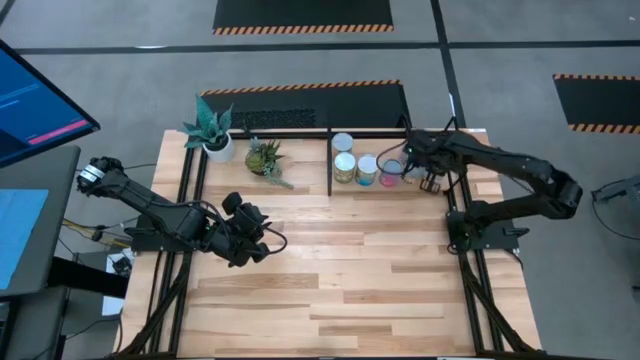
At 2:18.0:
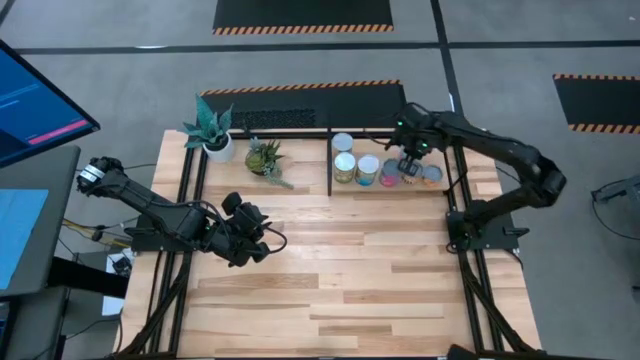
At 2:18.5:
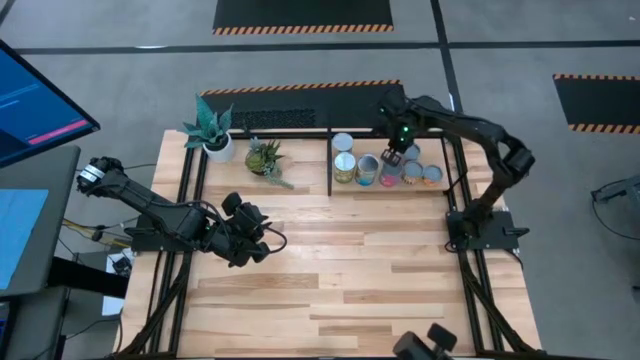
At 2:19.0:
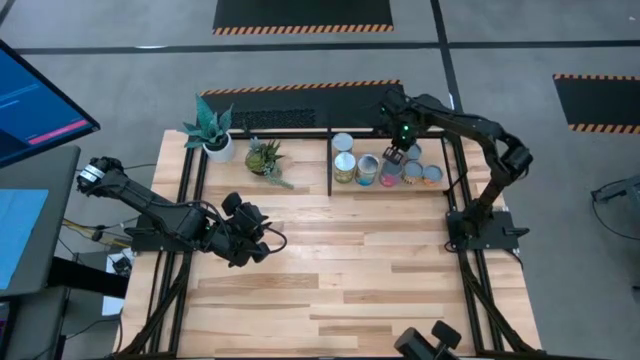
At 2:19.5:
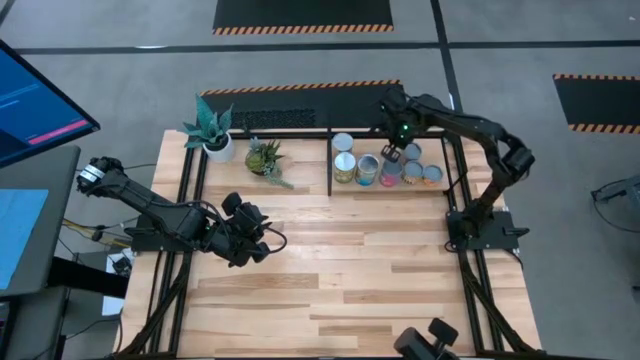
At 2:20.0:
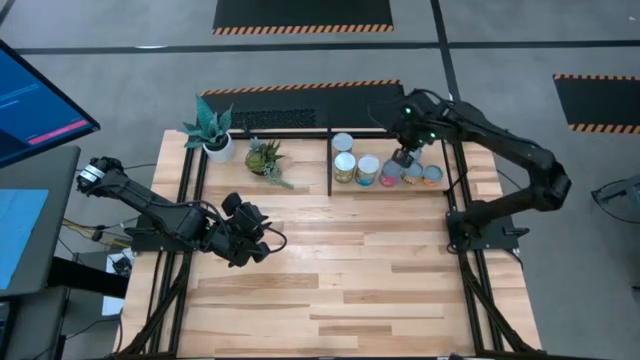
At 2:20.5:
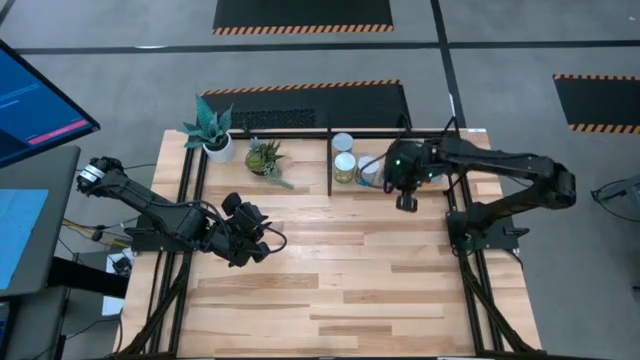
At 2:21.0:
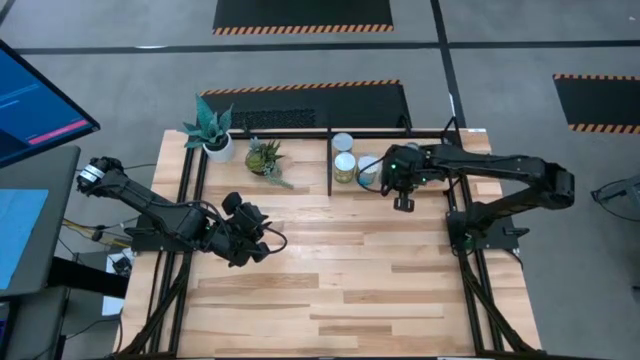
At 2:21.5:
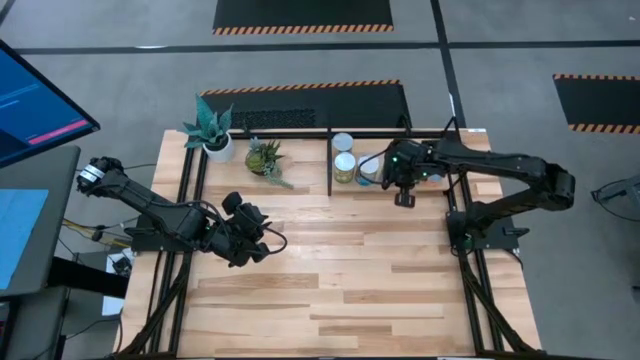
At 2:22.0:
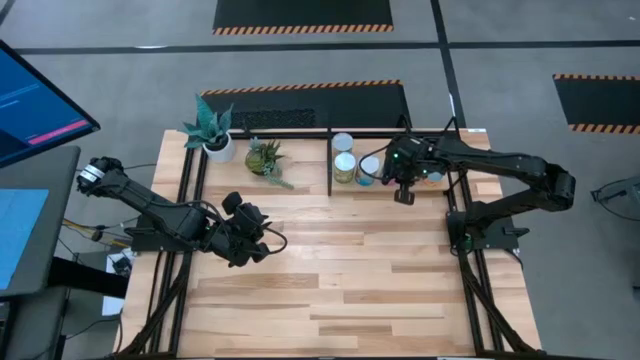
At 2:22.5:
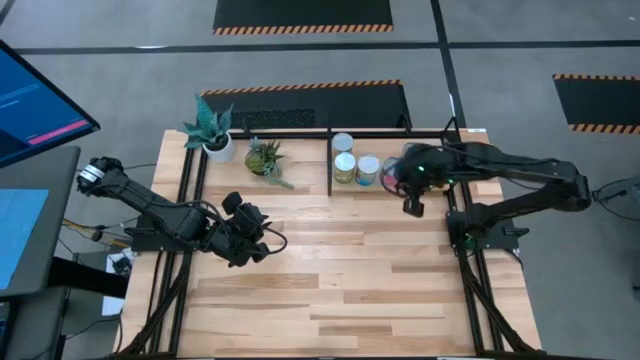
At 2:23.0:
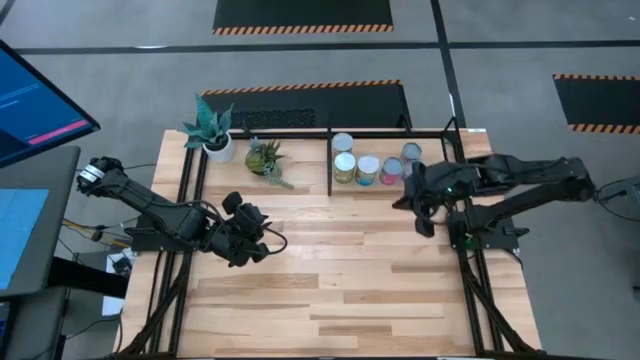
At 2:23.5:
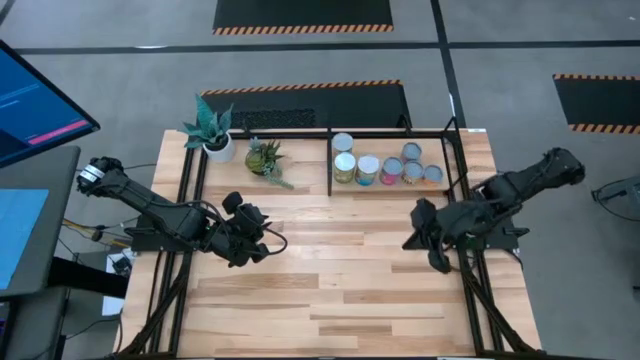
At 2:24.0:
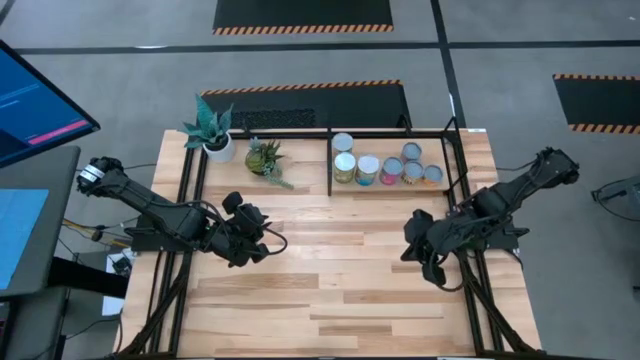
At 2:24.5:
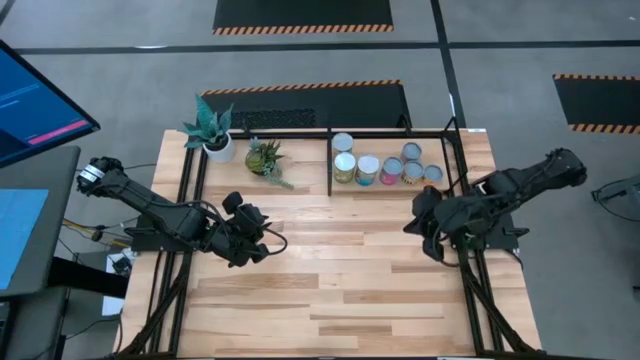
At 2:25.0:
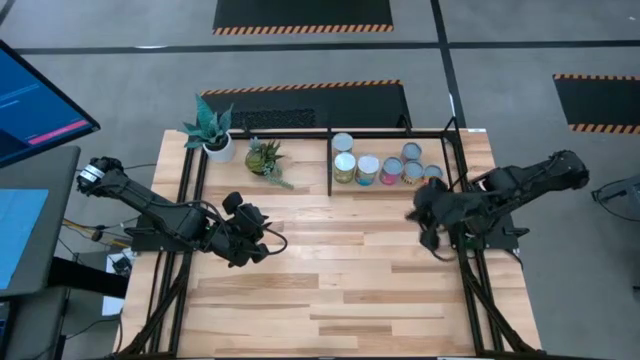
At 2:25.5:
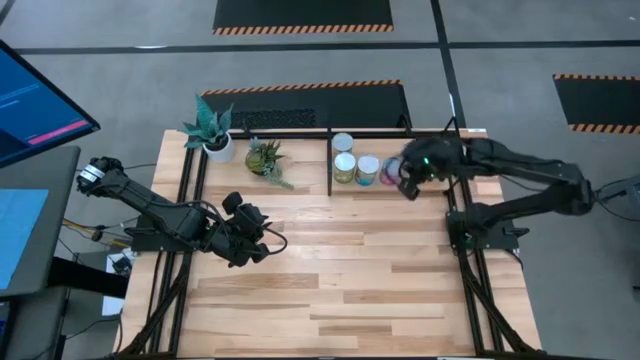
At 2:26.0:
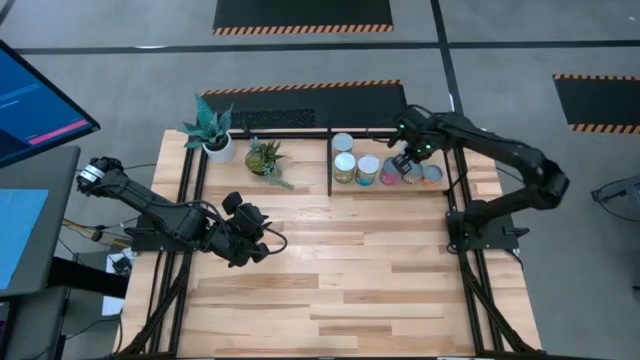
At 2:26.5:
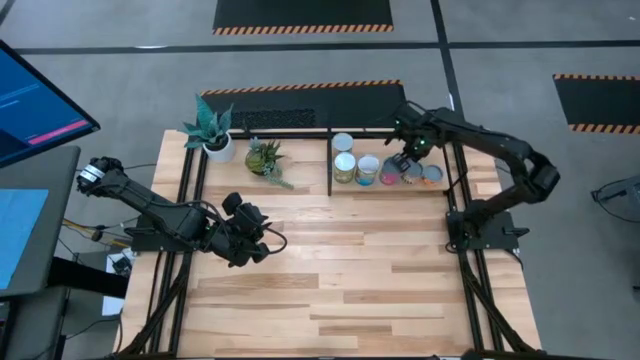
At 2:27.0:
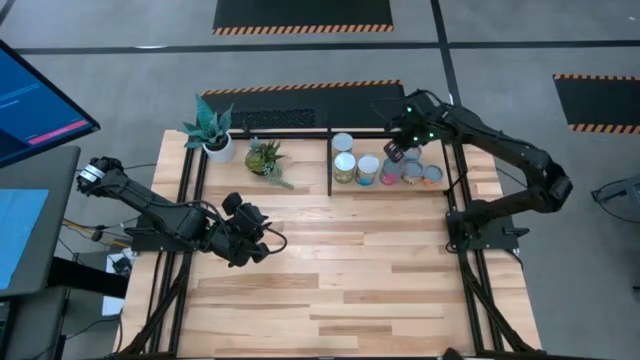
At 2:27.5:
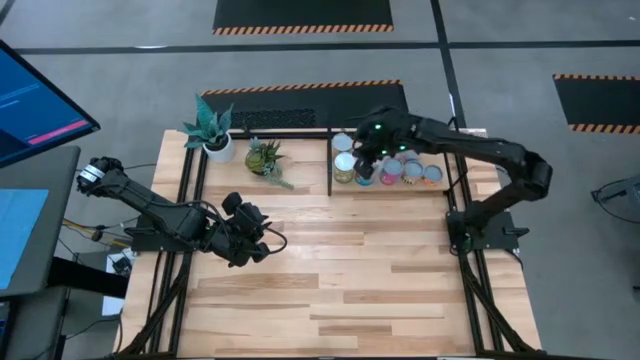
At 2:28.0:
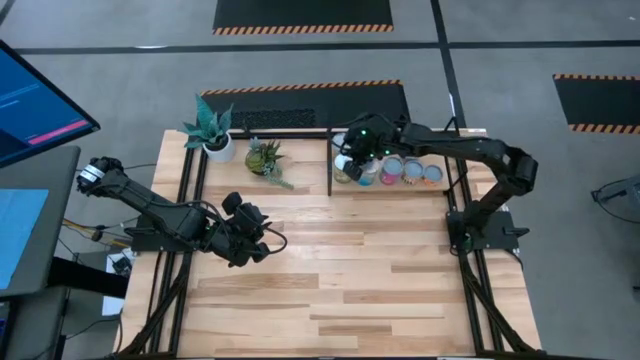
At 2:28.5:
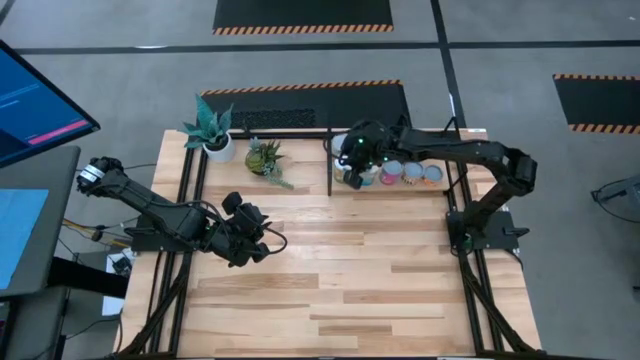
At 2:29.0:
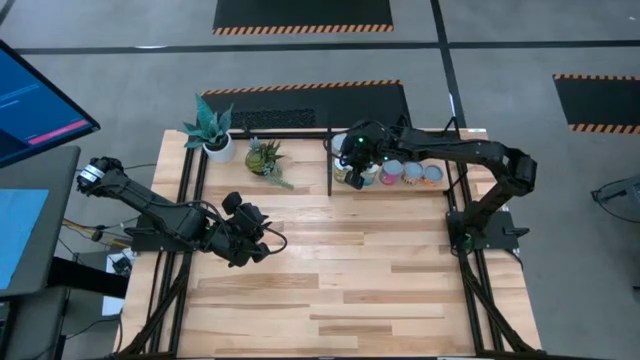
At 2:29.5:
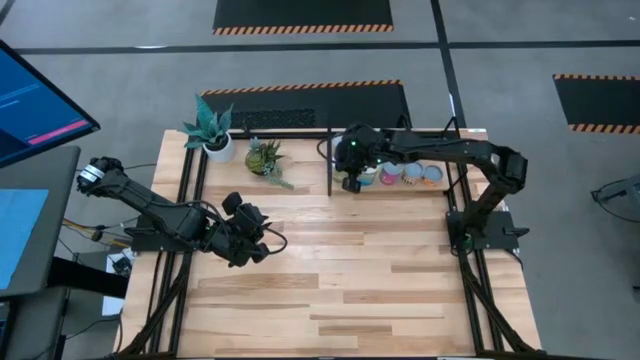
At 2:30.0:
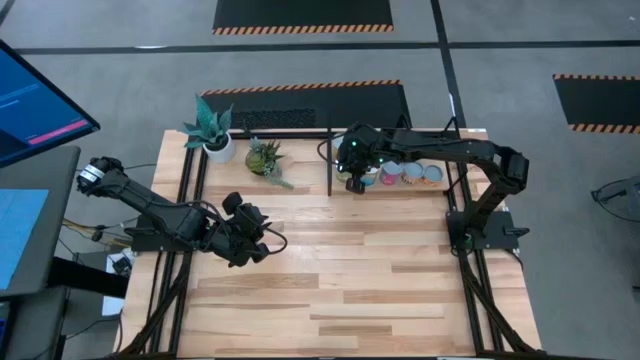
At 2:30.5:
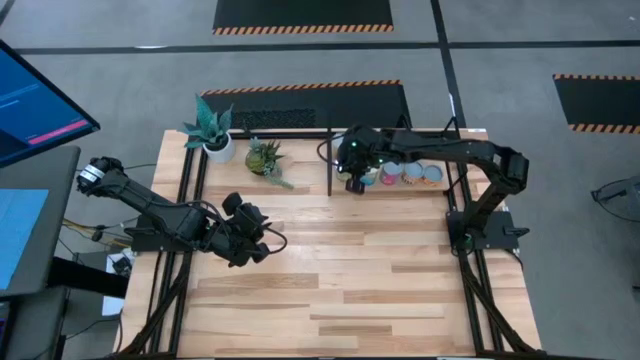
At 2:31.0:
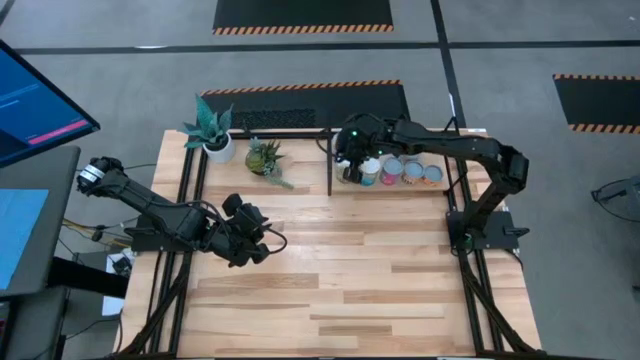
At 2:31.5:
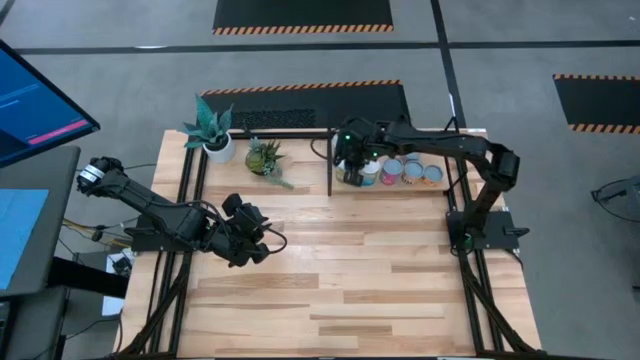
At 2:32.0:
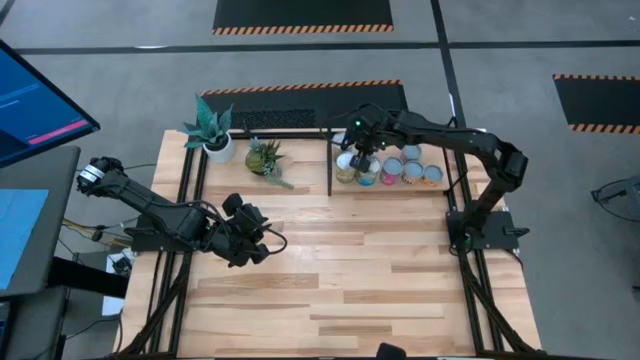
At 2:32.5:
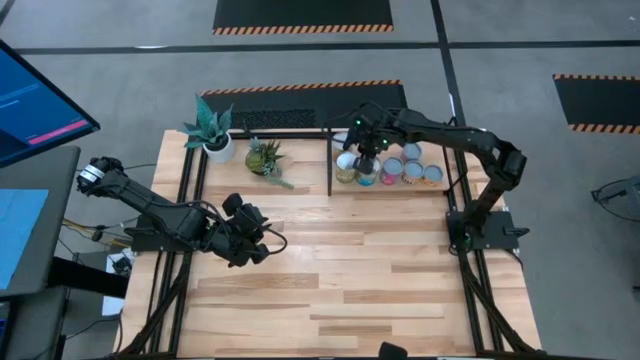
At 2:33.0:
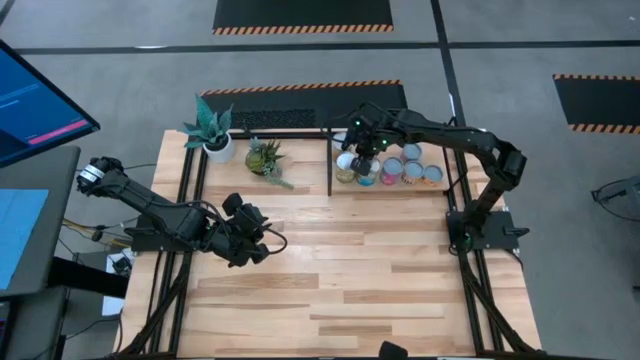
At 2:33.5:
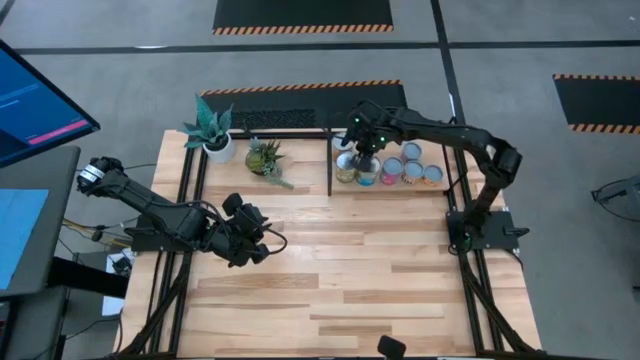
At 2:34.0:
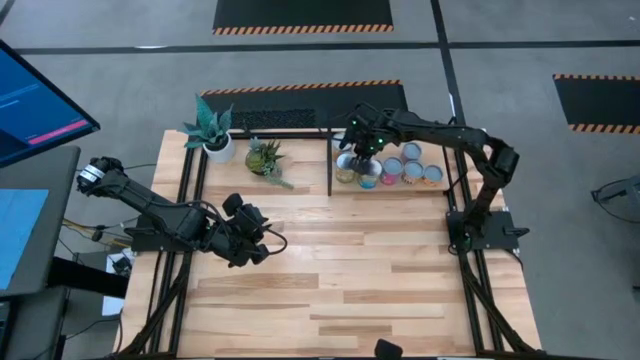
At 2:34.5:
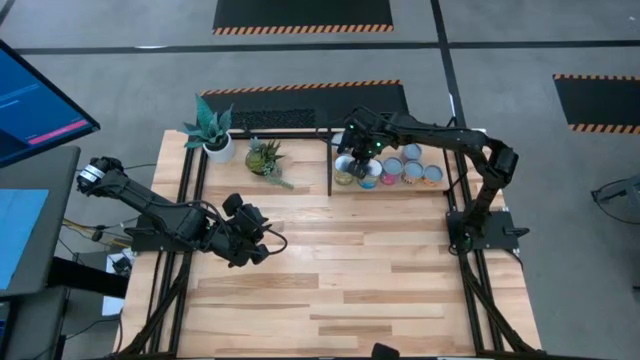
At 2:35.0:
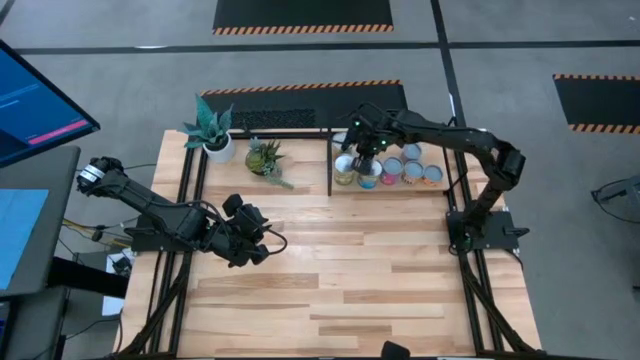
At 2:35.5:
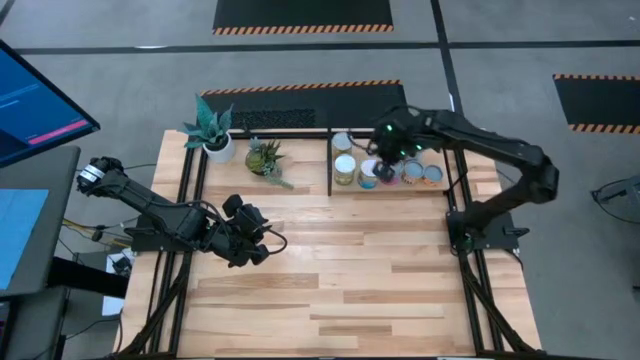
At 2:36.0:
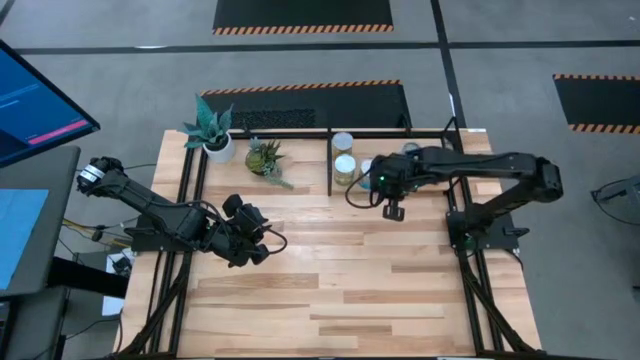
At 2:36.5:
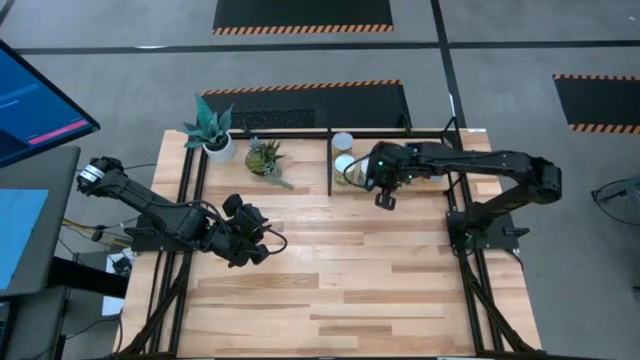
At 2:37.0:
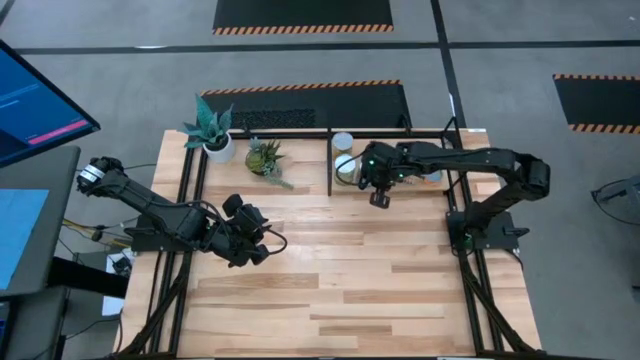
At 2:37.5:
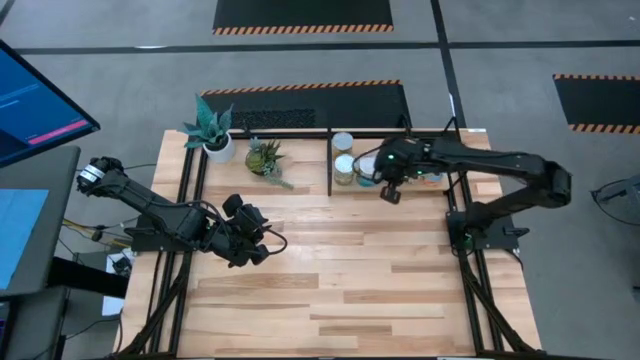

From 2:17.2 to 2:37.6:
Task: Pick and place cans onto a shelf
Adjust the canned goods on the shelf

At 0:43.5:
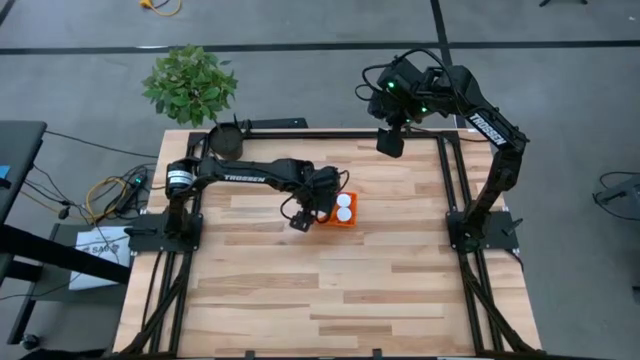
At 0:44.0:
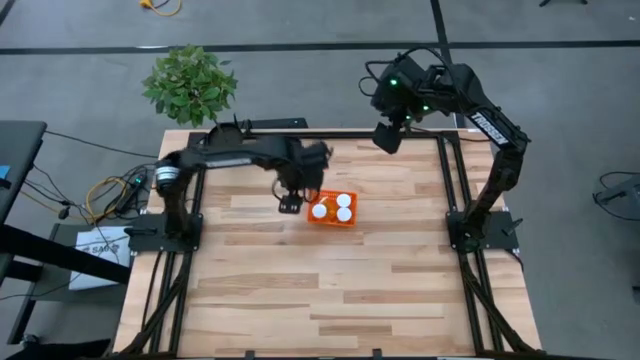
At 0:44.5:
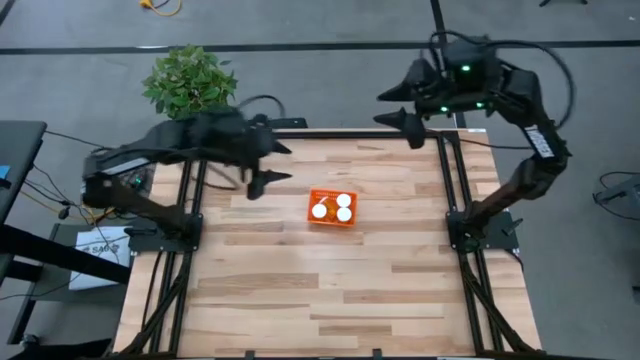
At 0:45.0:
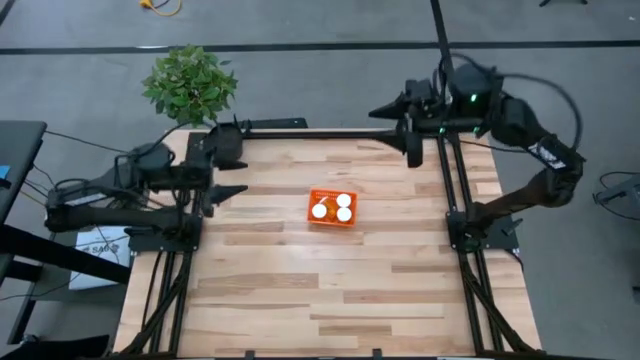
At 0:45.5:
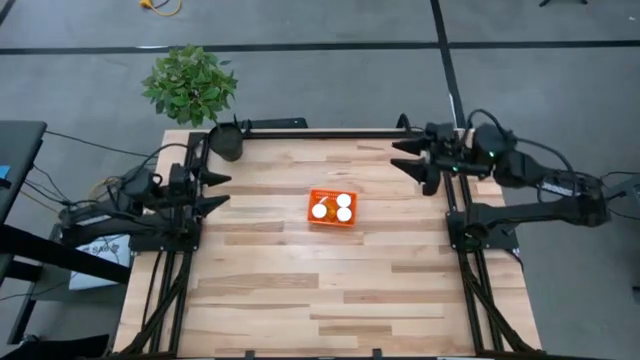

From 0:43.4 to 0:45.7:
Task: Pick and place pill bottles into a basket
Return to Home Position
